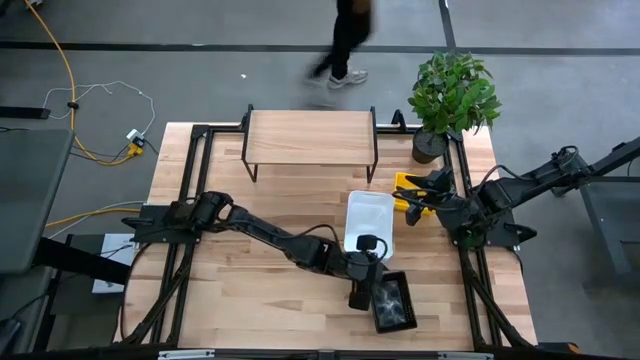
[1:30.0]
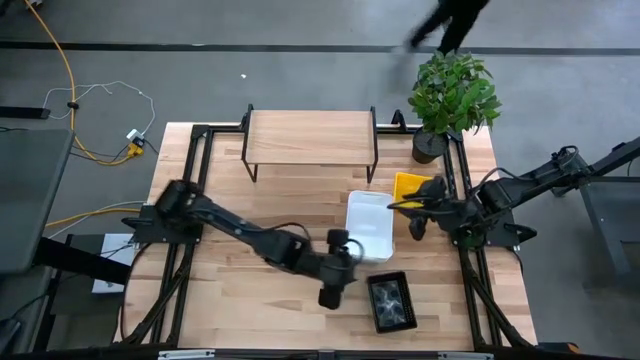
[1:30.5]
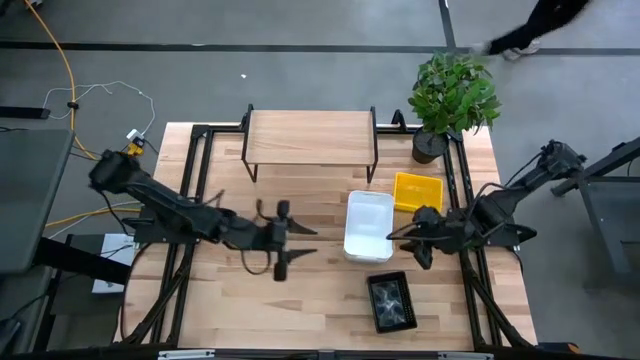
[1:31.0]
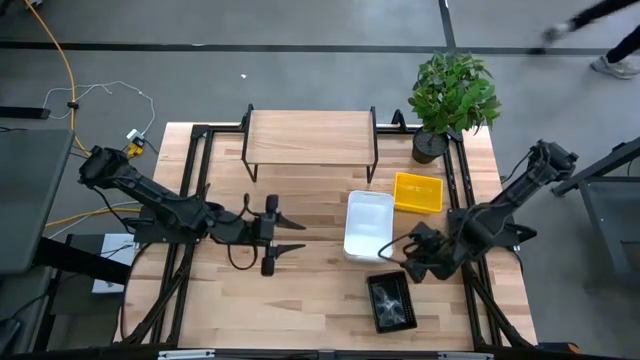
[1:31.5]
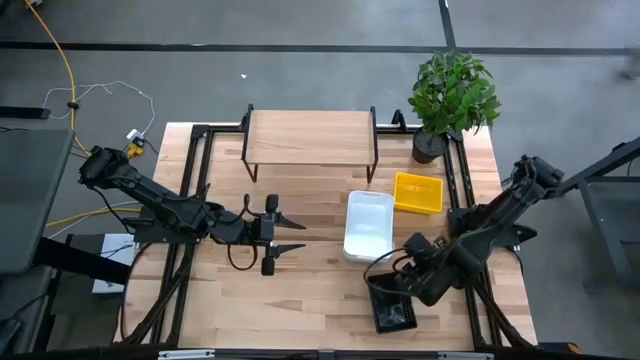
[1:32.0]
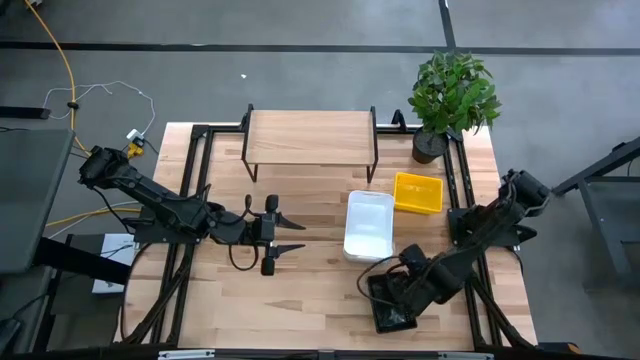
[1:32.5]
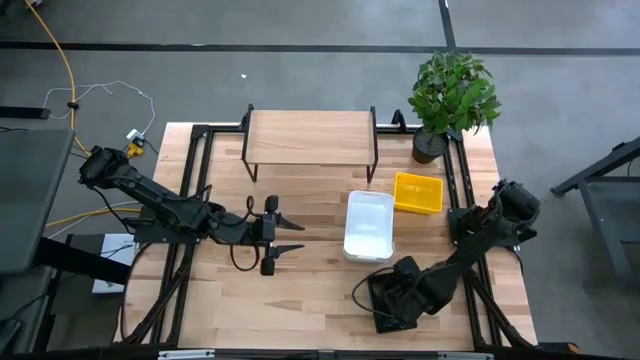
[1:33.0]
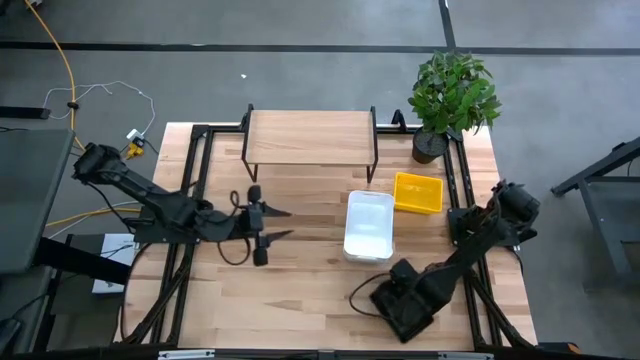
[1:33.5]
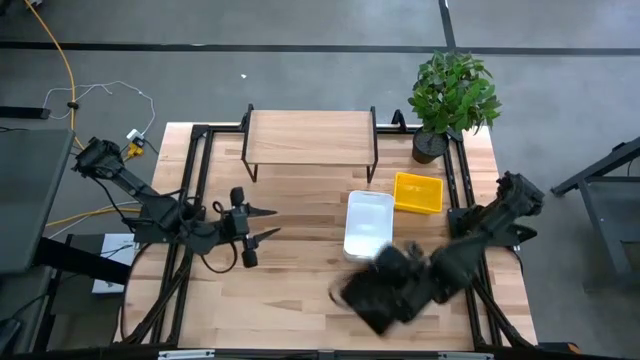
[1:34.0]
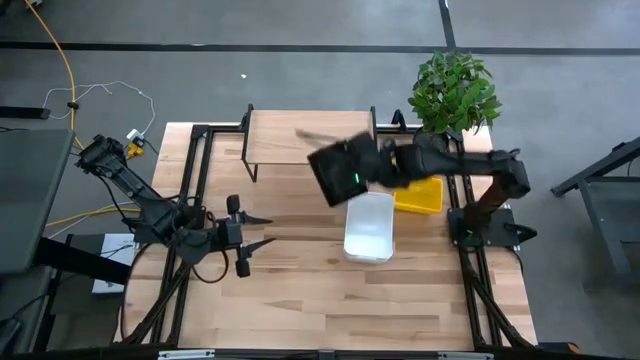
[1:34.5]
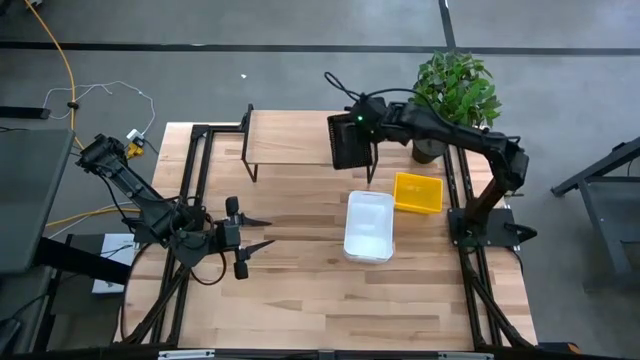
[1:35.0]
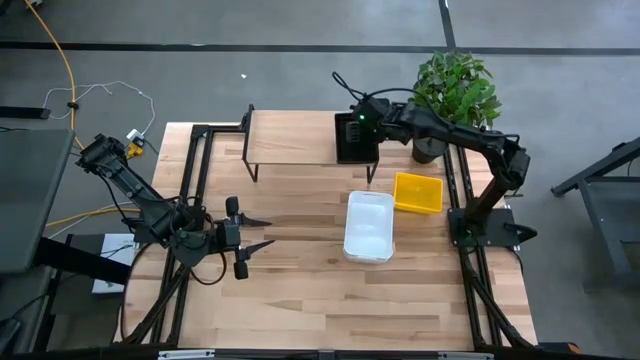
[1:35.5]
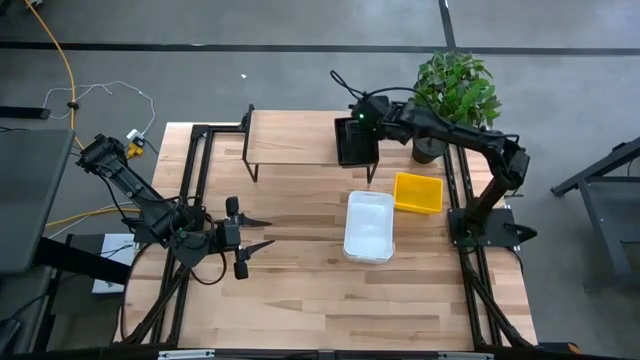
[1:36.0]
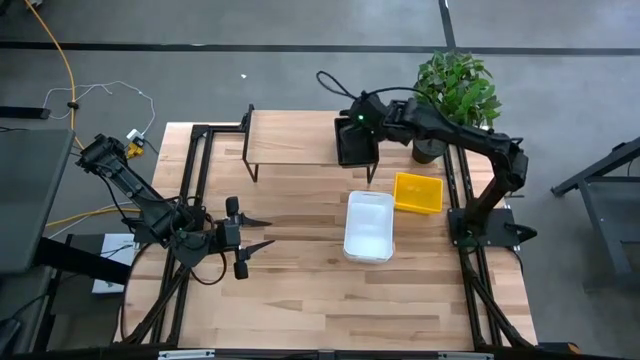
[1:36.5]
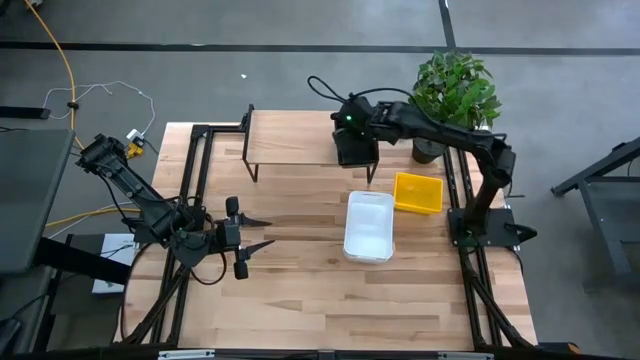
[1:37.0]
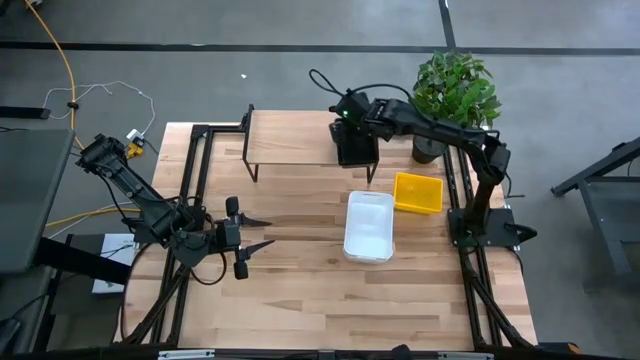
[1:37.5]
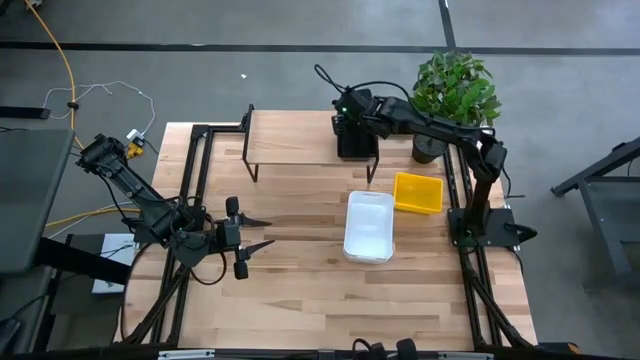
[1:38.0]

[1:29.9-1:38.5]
Task: Stack baskets on shelf by color
Put the stacked black bins on the shelf

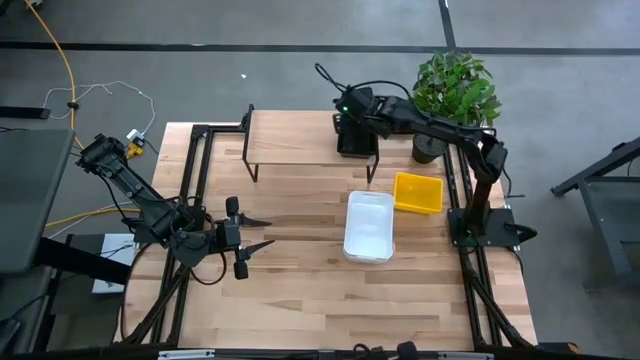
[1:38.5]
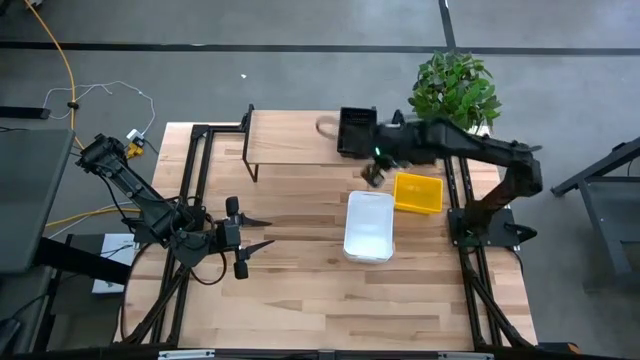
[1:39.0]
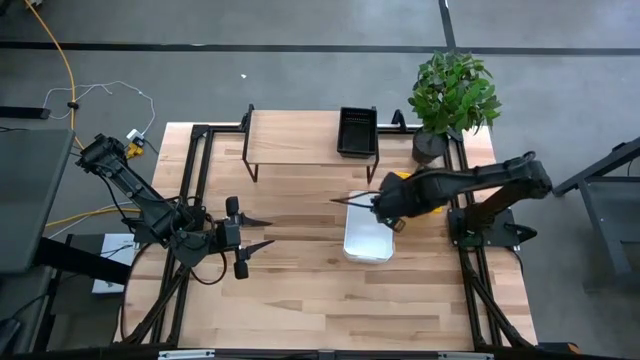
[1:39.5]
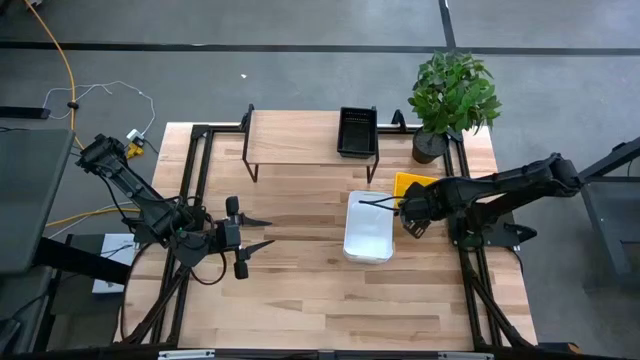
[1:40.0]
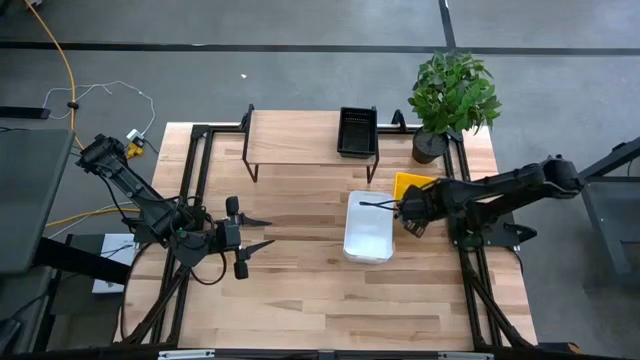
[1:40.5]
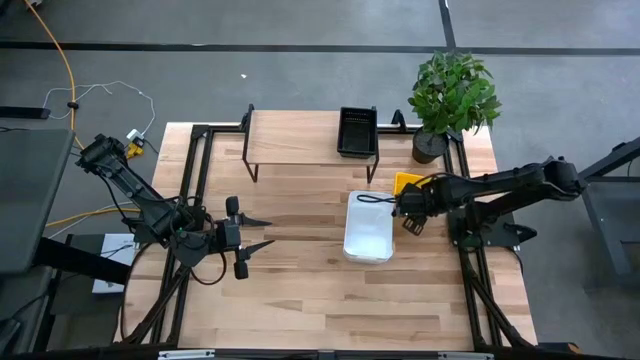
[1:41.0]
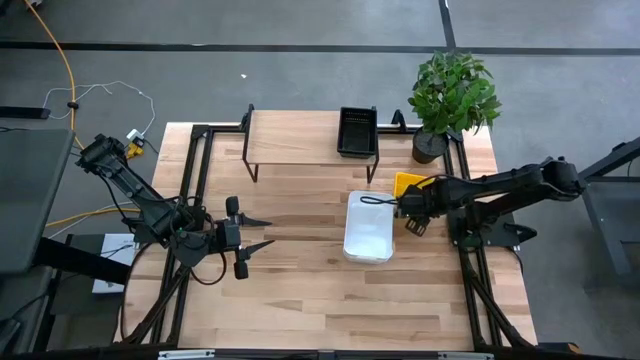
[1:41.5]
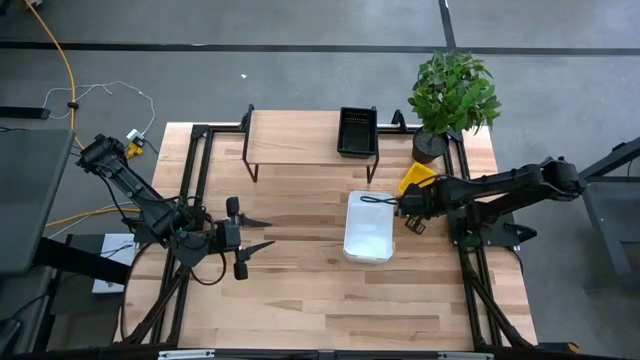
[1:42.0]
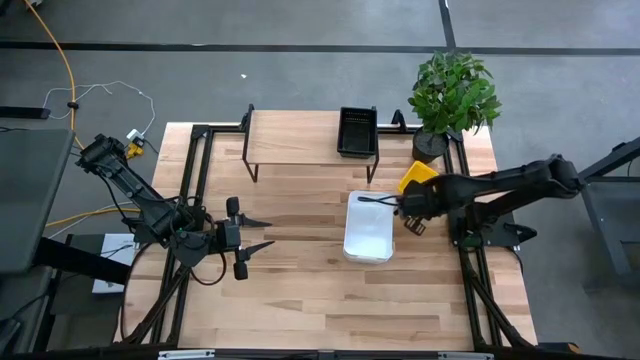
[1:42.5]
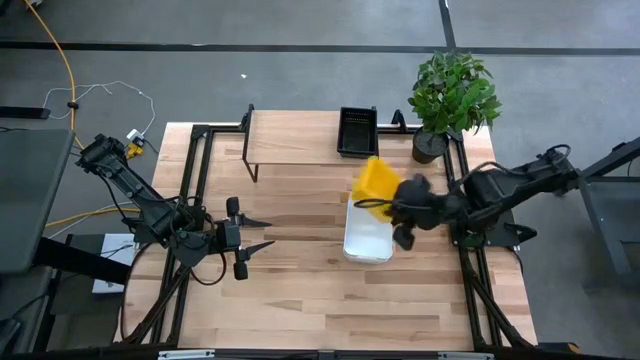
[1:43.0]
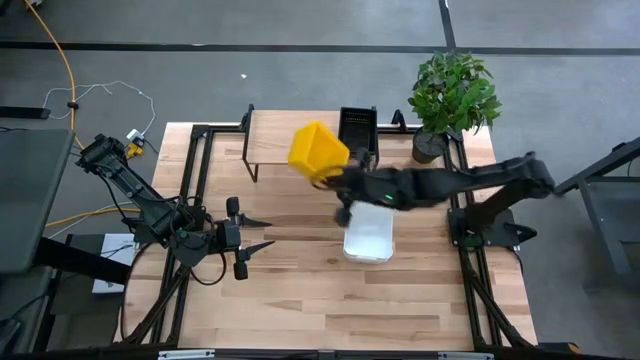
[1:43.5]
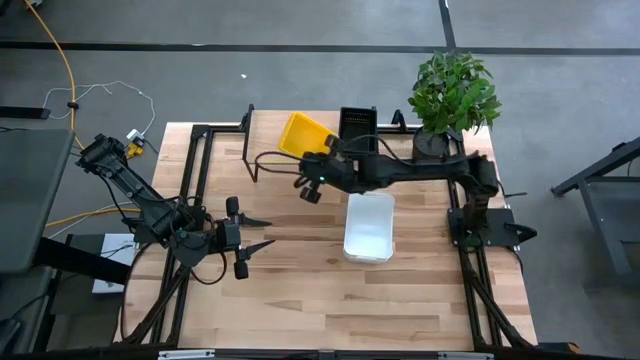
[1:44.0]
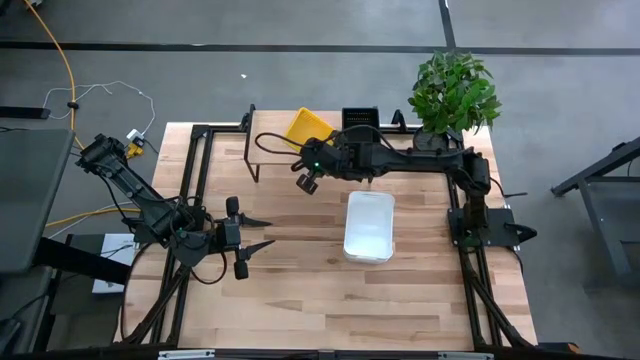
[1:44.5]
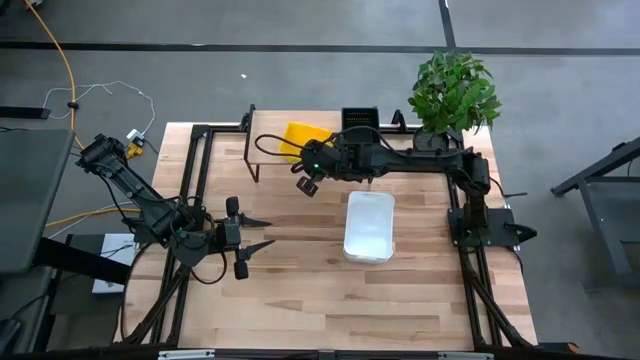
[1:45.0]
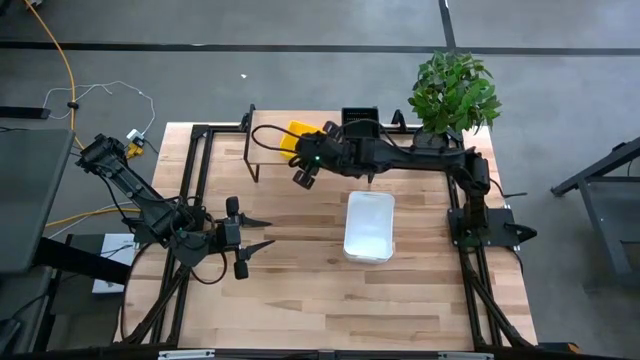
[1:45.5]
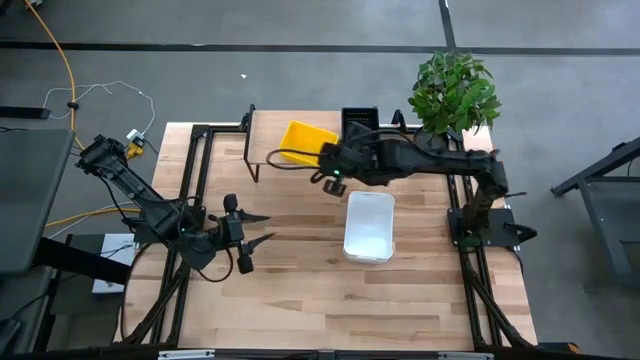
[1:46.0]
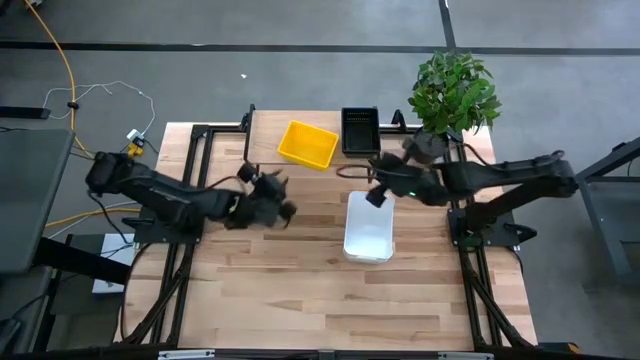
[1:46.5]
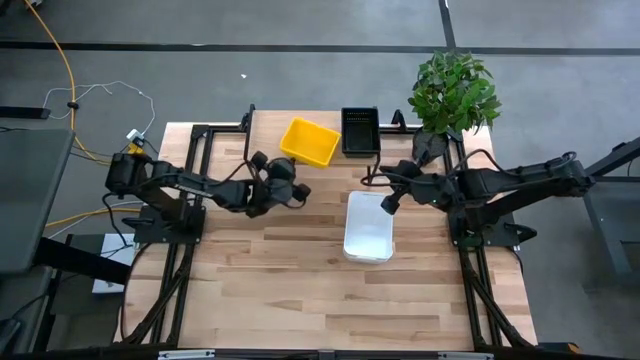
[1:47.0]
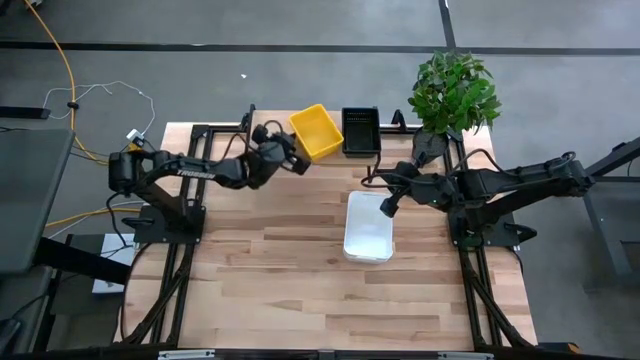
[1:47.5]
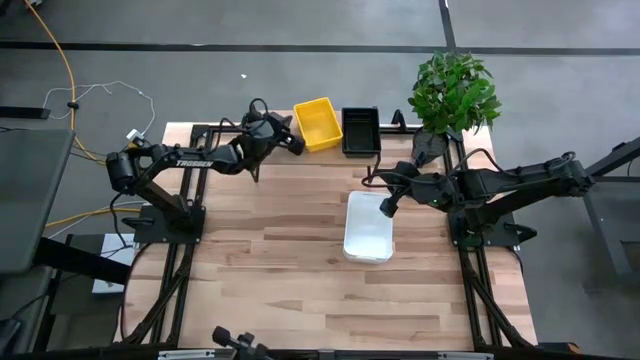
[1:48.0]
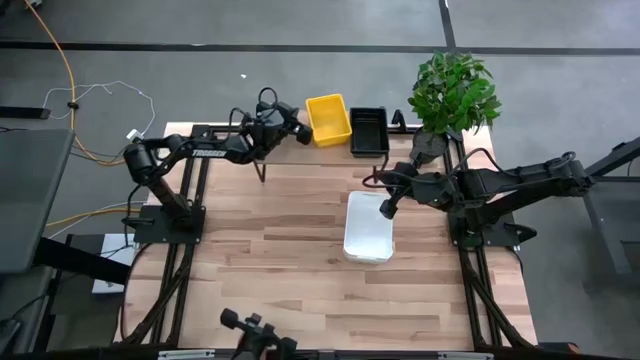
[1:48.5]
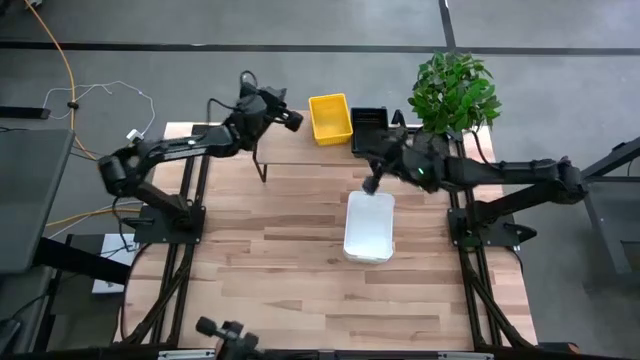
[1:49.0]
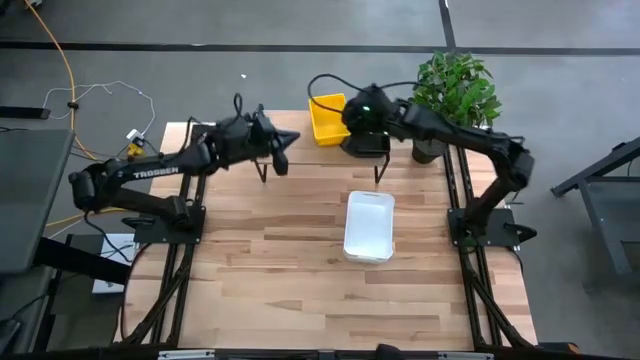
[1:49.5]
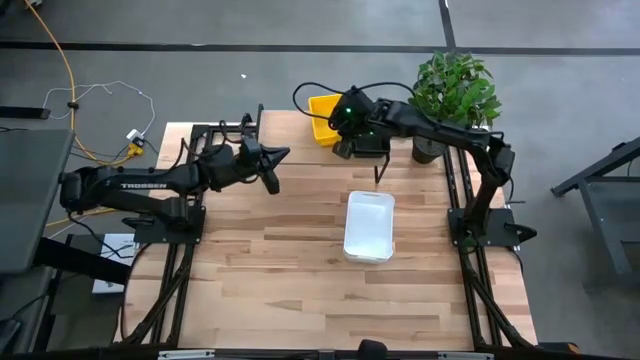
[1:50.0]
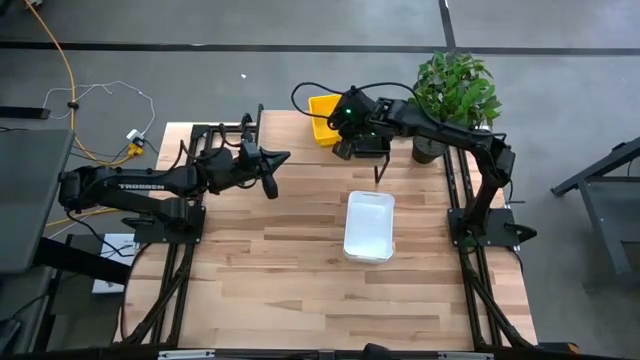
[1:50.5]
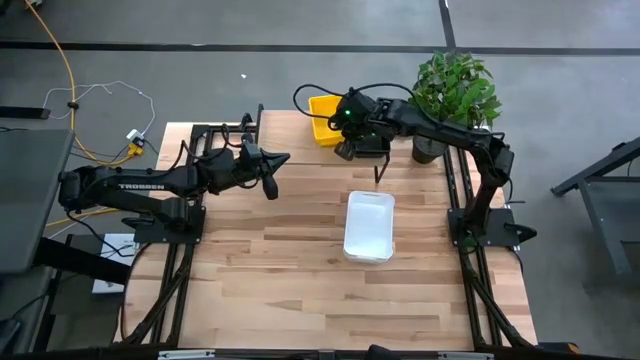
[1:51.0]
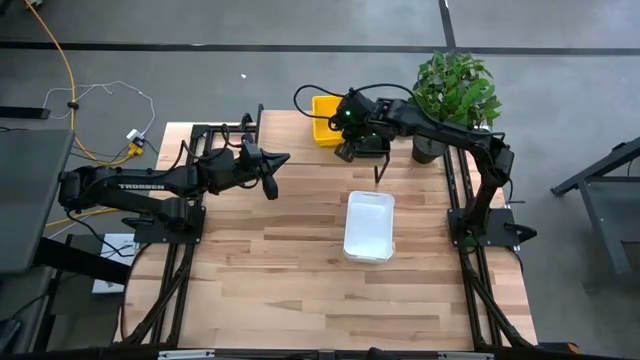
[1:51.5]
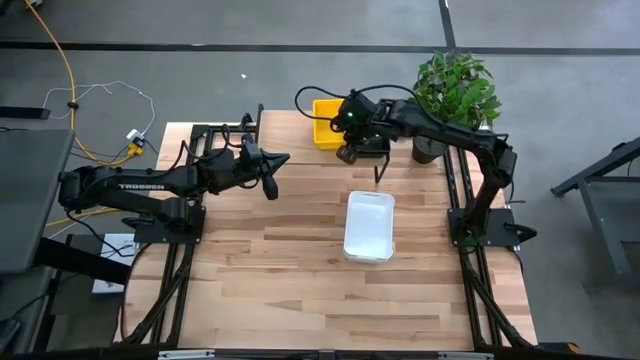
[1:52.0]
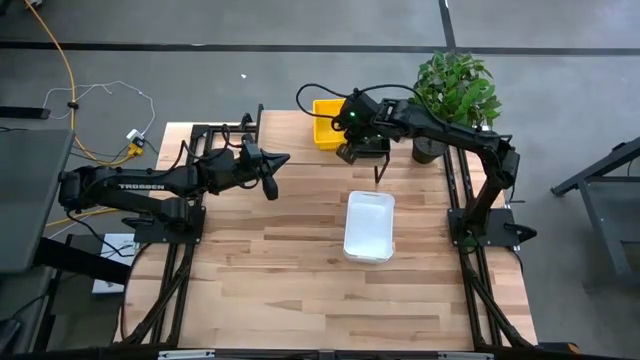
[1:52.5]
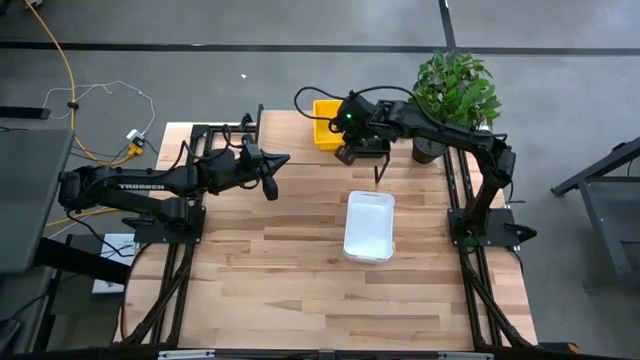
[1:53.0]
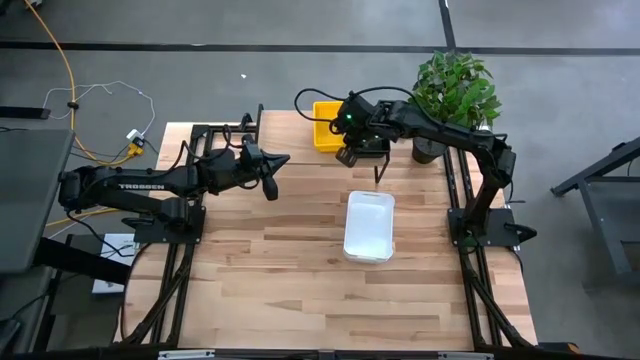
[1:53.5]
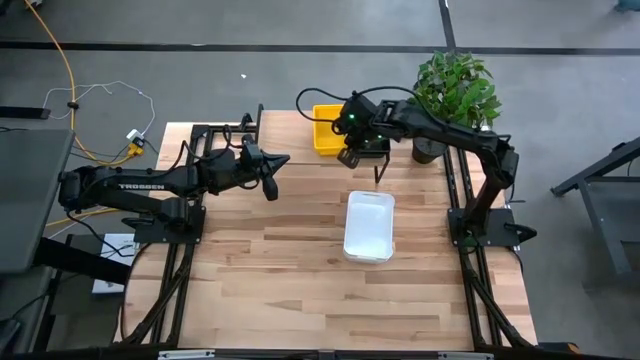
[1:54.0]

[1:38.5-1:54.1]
Put the stacked yellow bins on the shelf
